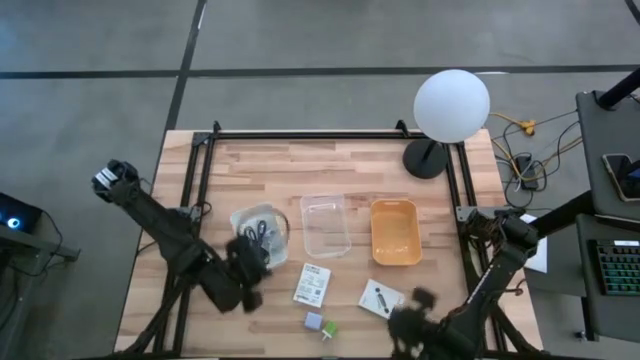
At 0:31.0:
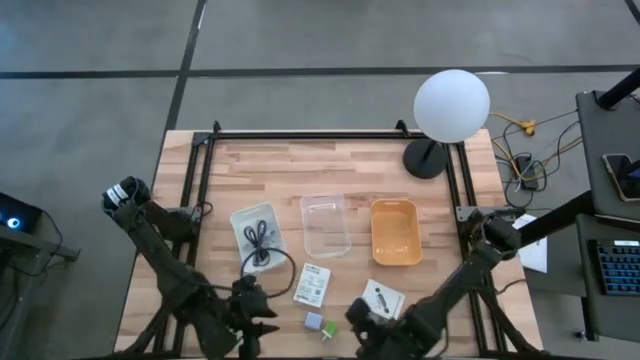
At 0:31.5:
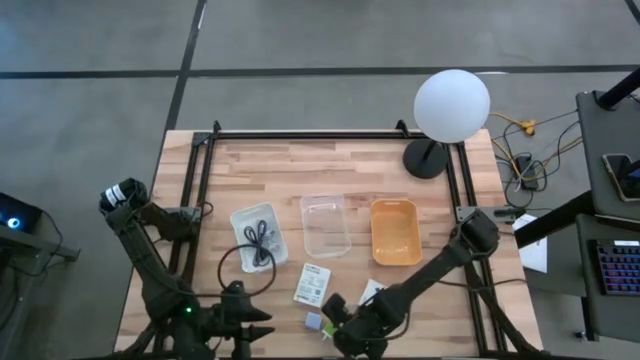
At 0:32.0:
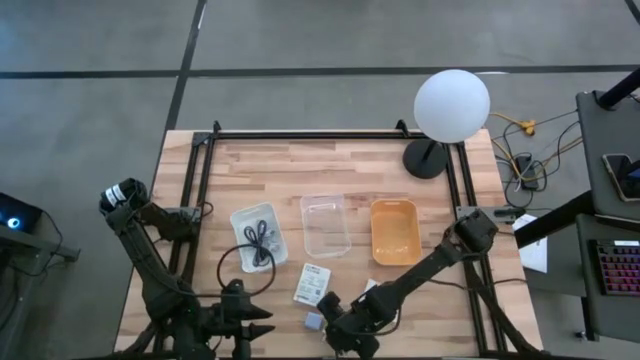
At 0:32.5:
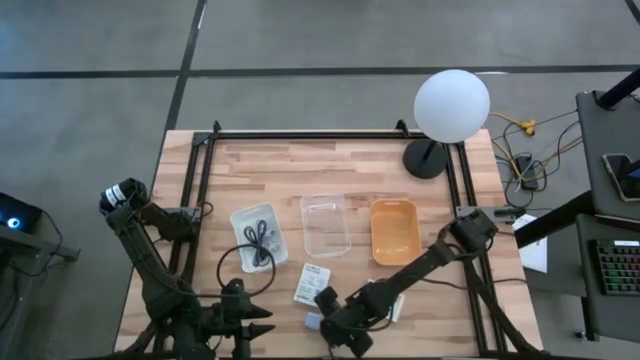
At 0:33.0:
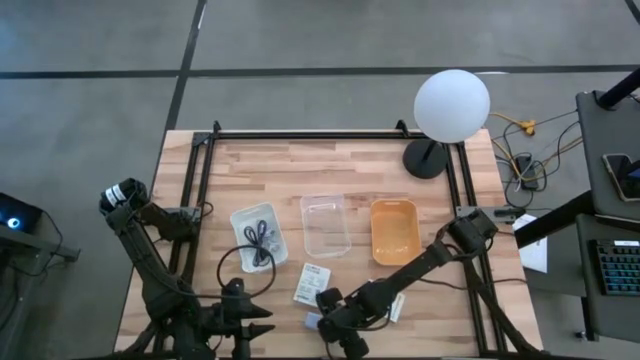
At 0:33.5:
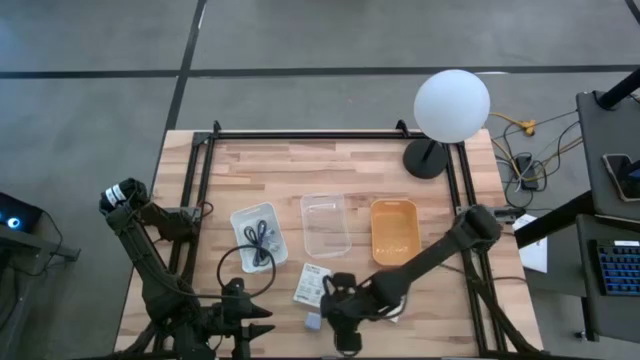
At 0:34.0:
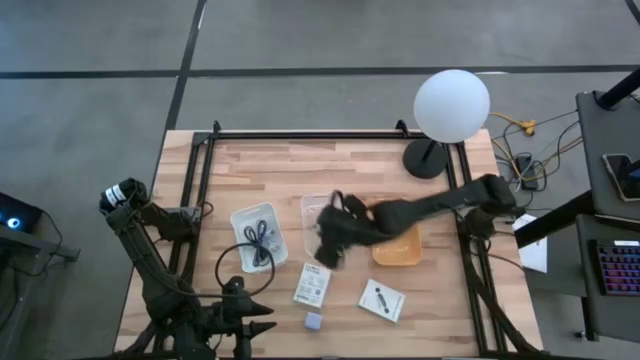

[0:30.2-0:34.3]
Task: Pick and place items into bin
Put the green charger adapter into the transparent bin

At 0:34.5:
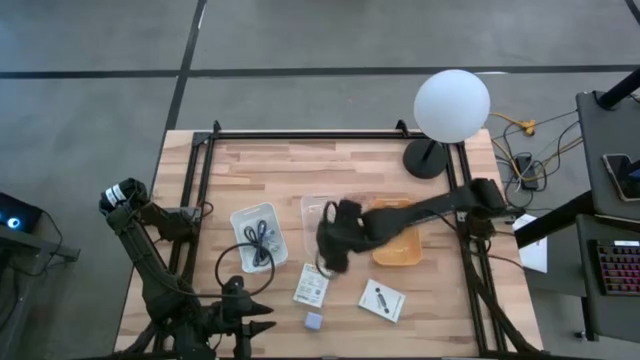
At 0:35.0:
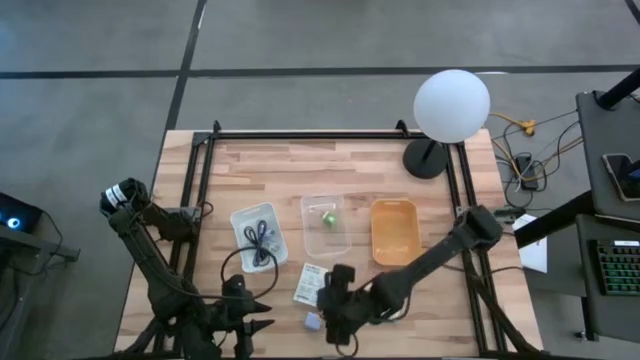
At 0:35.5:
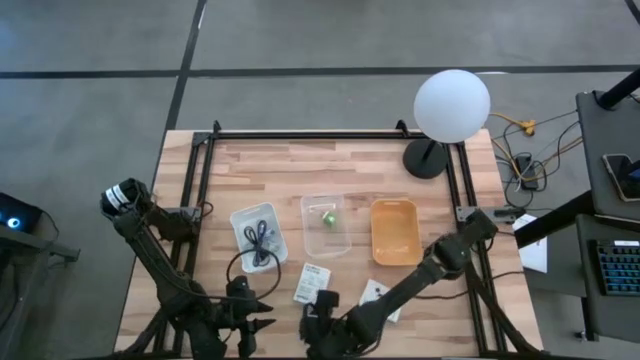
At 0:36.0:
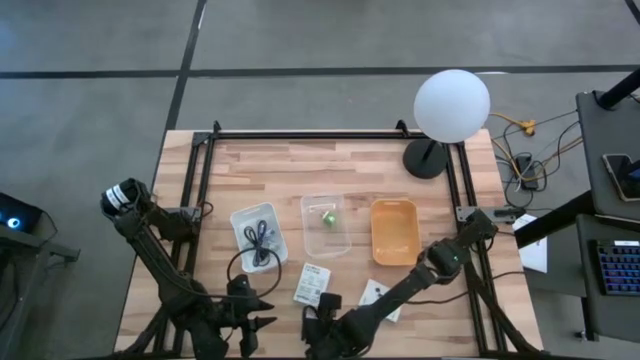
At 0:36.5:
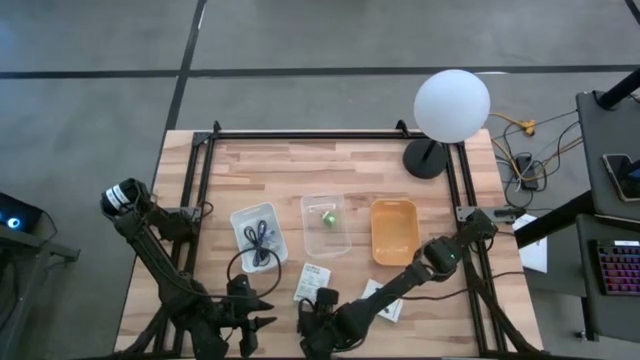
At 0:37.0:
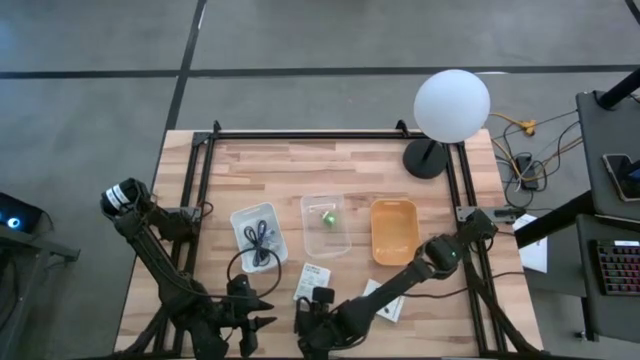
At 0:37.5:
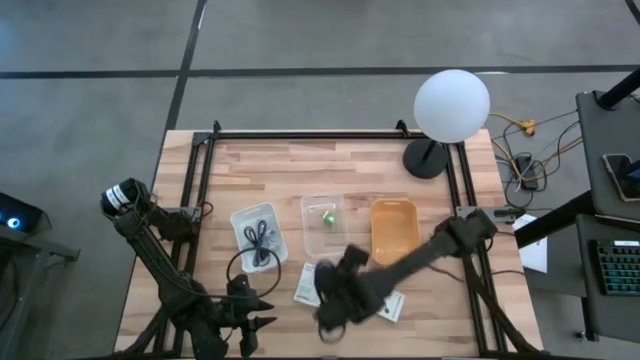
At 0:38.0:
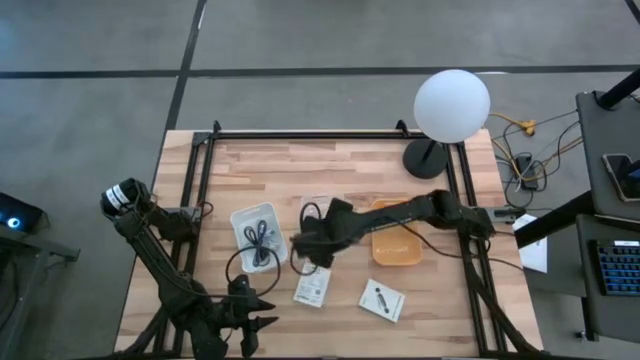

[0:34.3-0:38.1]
Put the light blue charger adapter into the transparent bin

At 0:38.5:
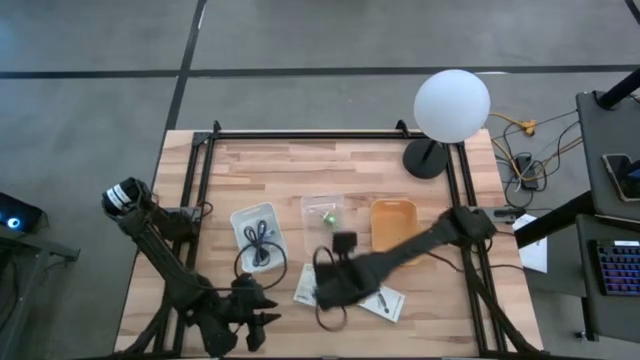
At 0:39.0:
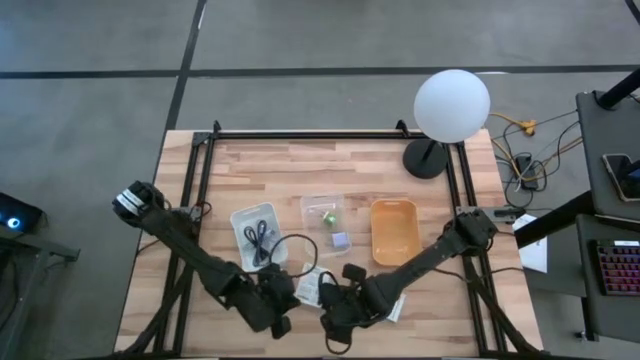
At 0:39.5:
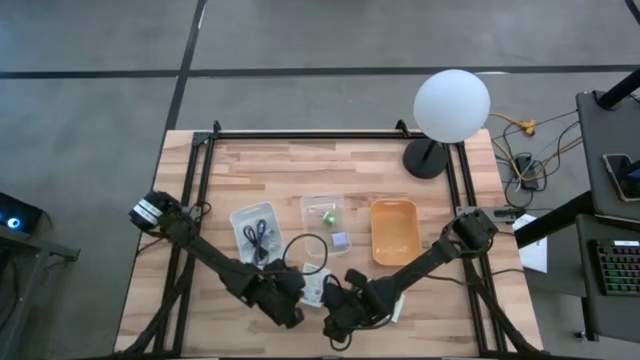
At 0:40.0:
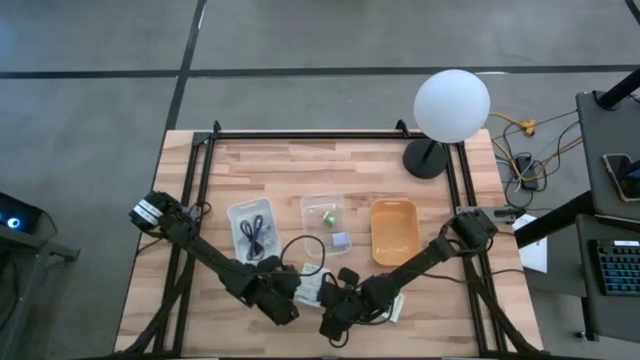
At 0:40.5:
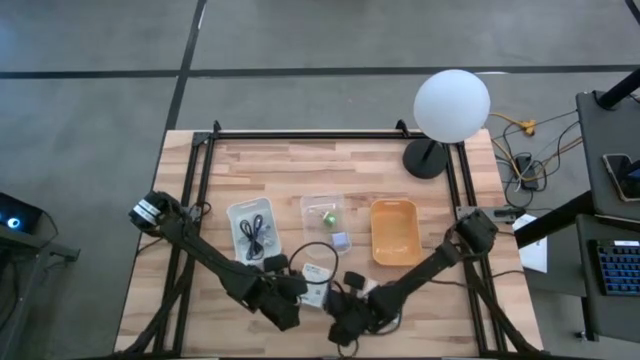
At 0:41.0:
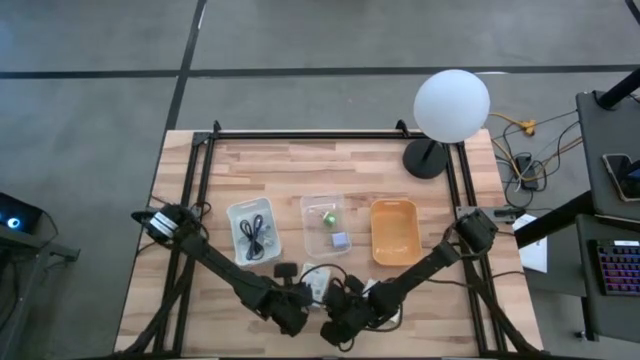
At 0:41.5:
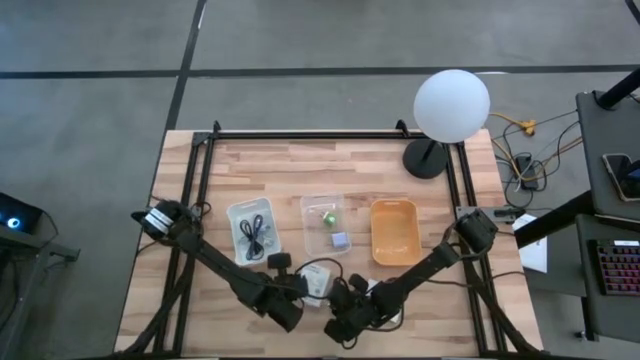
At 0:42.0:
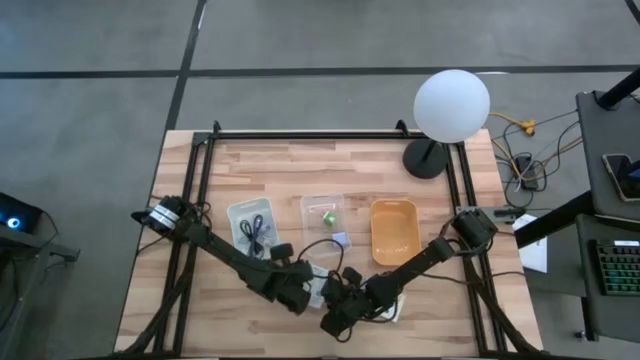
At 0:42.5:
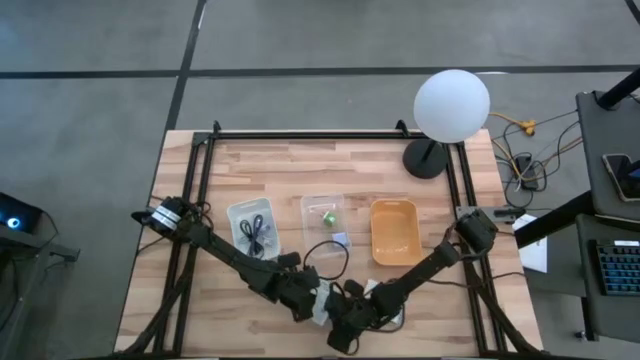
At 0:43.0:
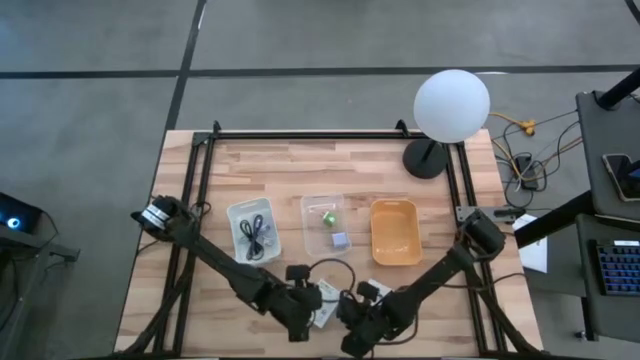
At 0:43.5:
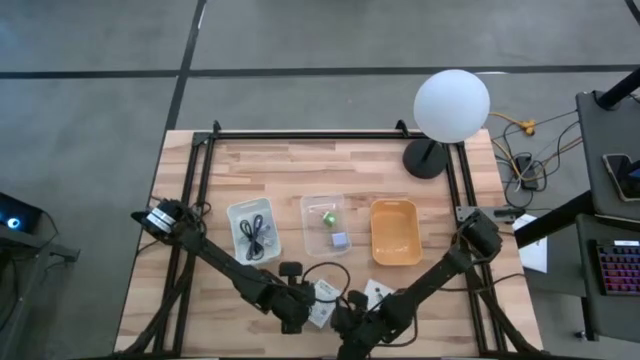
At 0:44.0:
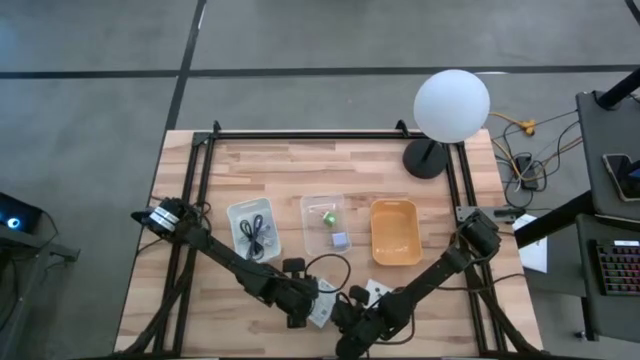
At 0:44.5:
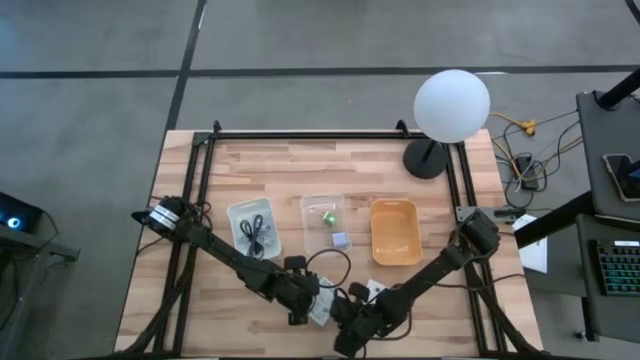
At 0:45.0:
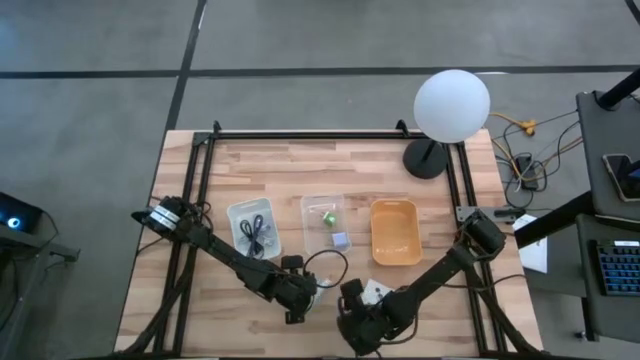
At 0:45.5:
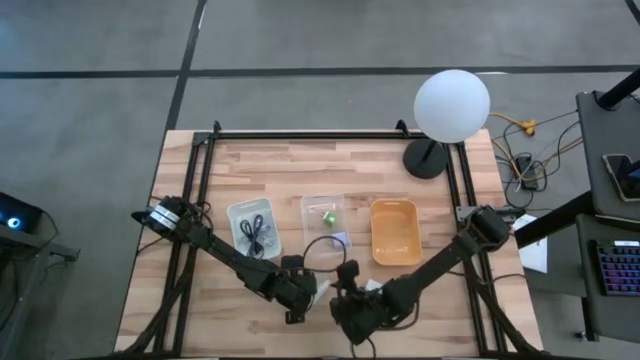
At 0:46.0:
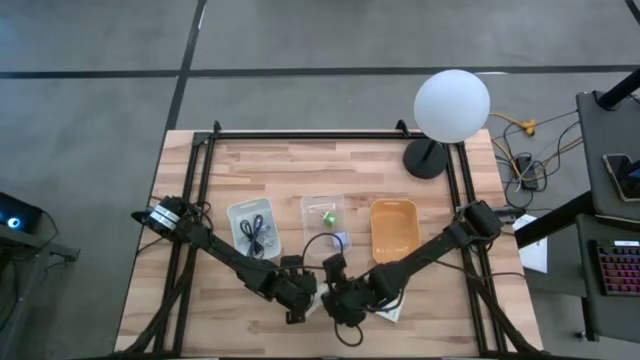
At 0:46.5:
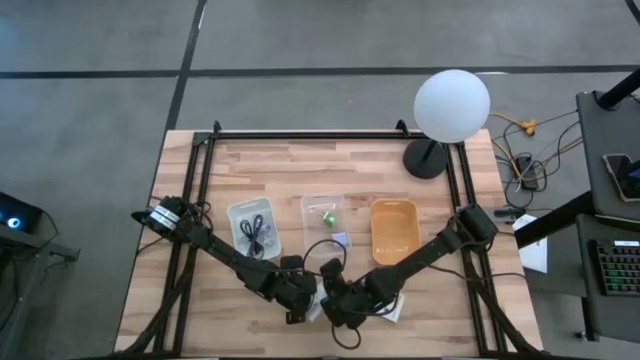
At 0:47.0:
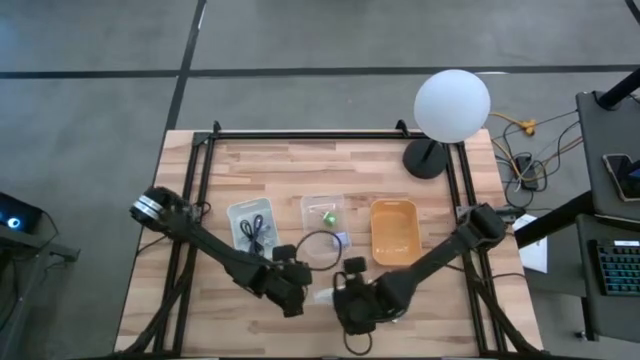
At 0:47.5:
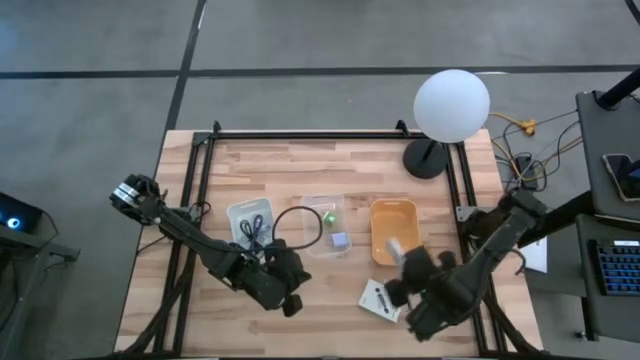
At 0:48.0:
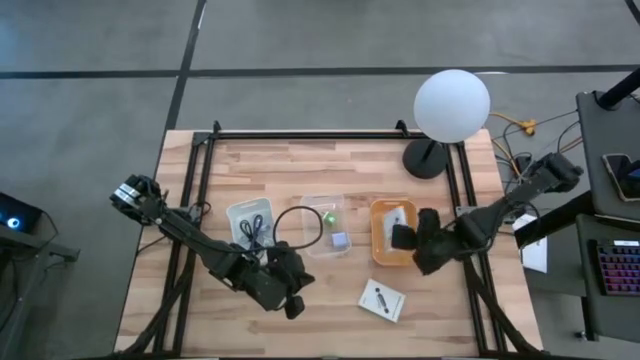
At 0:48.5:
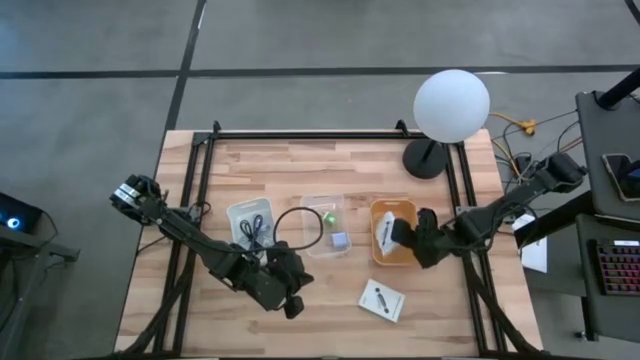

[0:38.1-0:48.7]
Put the left white card reader box into the yellow bin
